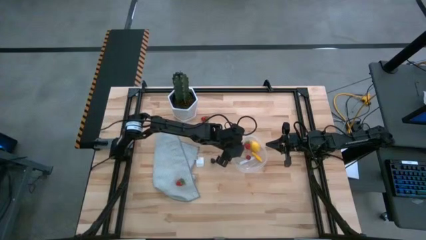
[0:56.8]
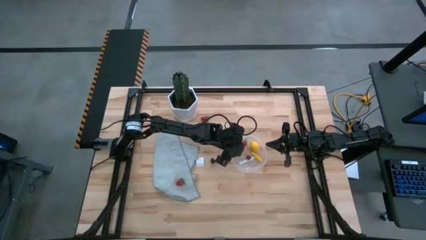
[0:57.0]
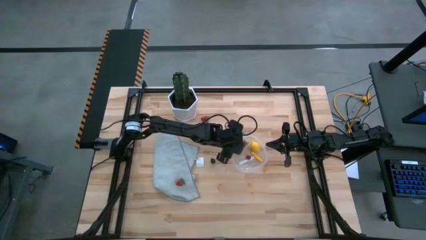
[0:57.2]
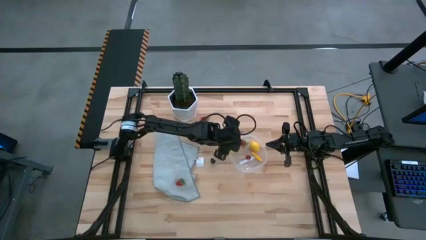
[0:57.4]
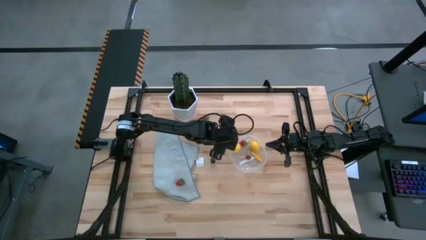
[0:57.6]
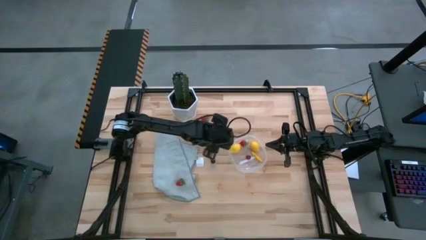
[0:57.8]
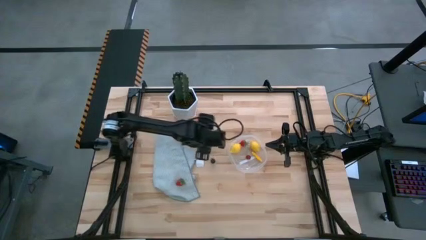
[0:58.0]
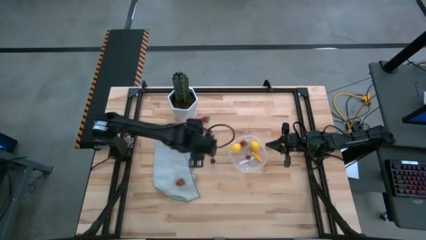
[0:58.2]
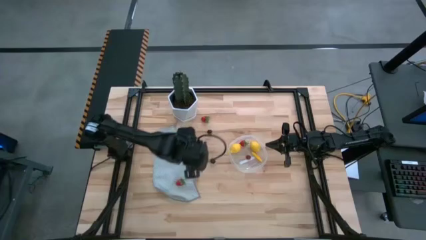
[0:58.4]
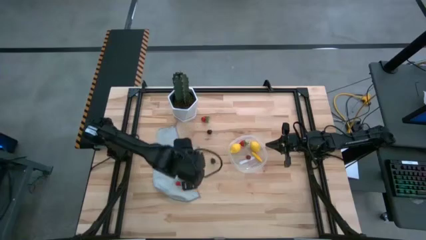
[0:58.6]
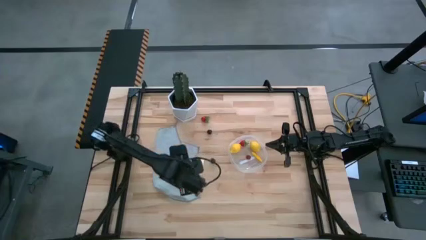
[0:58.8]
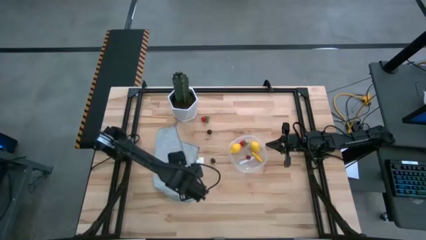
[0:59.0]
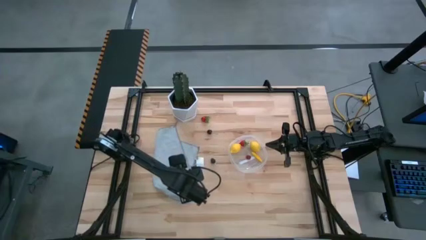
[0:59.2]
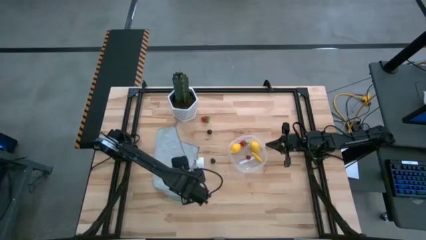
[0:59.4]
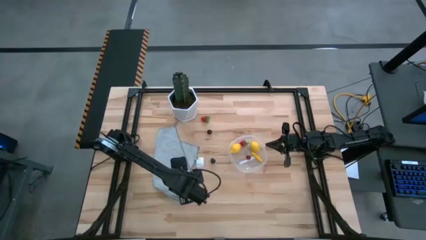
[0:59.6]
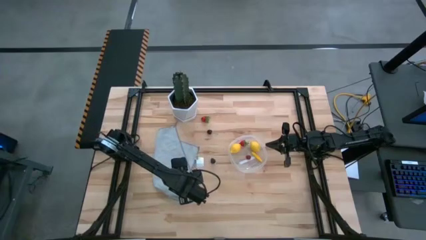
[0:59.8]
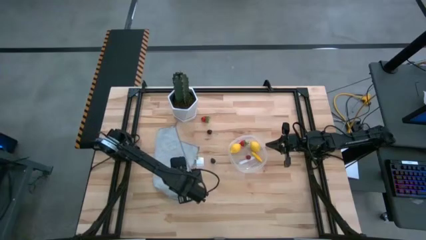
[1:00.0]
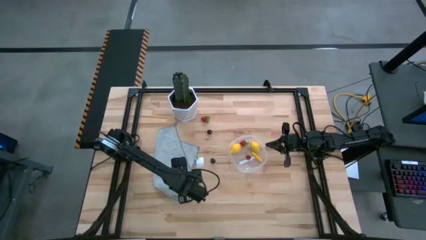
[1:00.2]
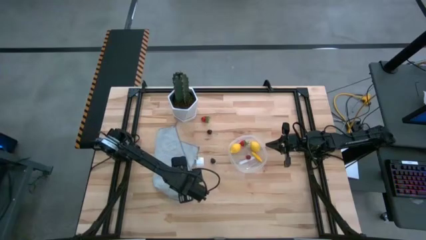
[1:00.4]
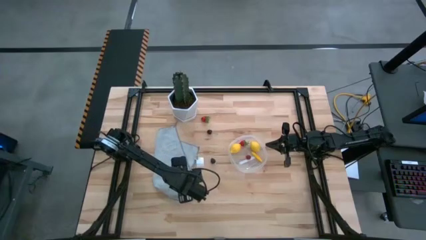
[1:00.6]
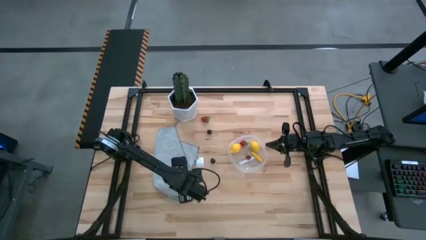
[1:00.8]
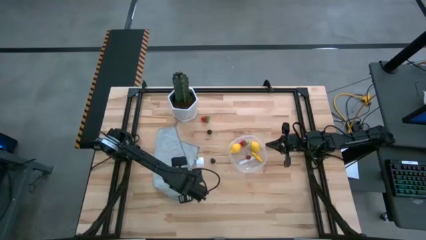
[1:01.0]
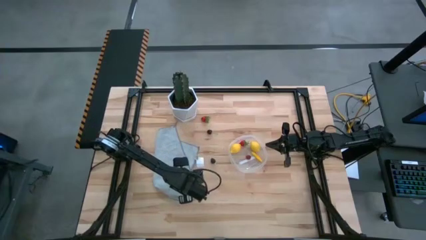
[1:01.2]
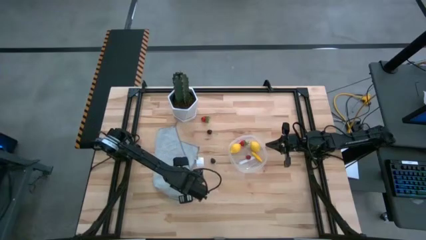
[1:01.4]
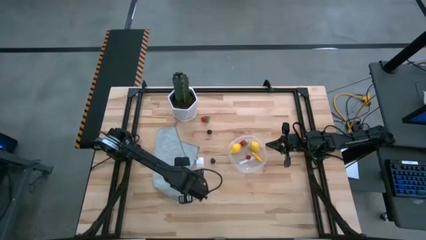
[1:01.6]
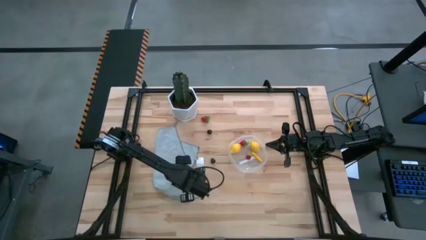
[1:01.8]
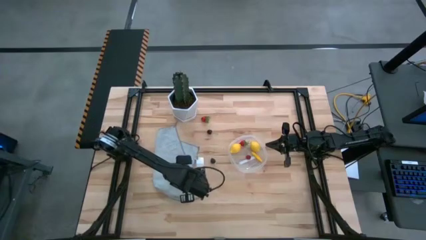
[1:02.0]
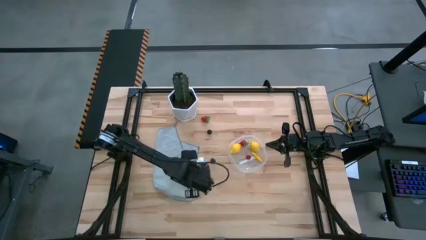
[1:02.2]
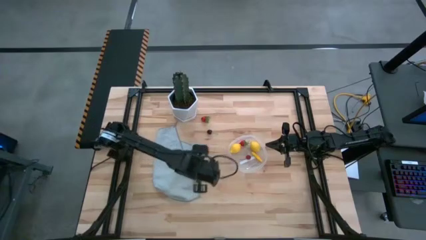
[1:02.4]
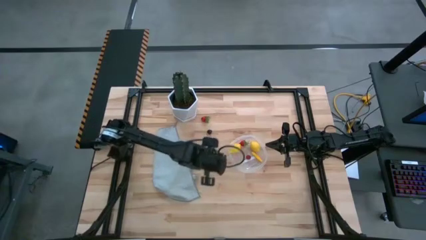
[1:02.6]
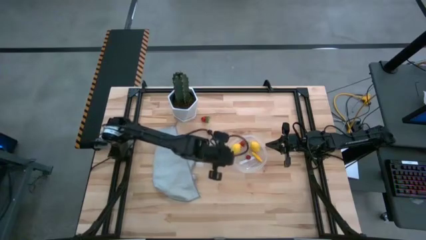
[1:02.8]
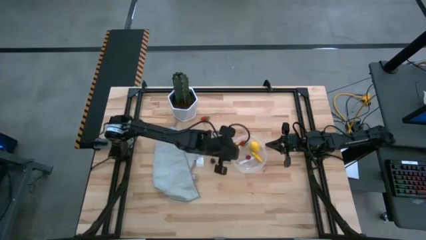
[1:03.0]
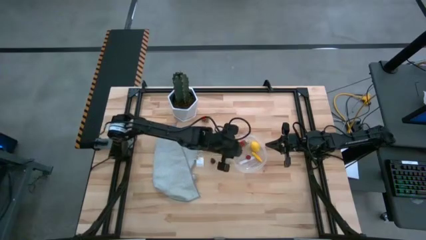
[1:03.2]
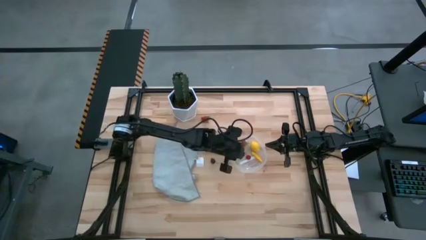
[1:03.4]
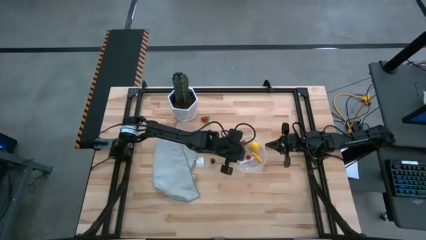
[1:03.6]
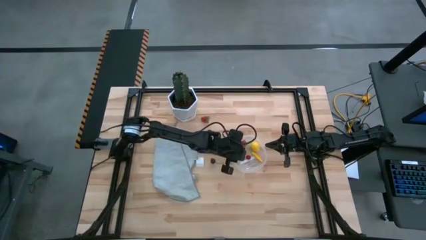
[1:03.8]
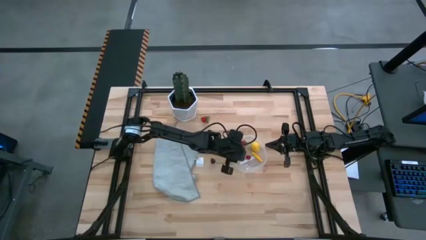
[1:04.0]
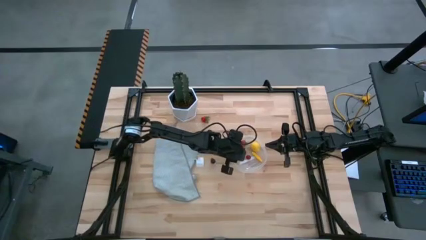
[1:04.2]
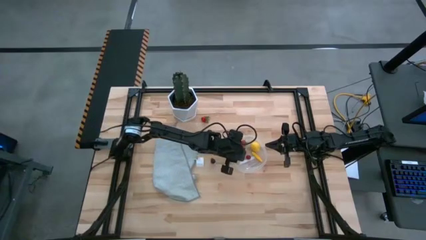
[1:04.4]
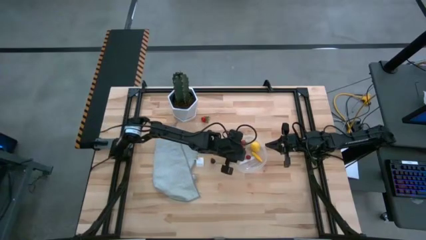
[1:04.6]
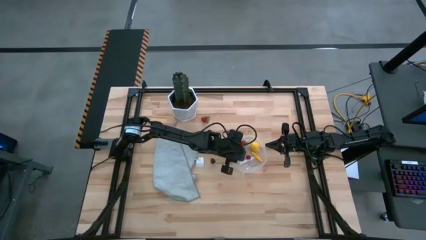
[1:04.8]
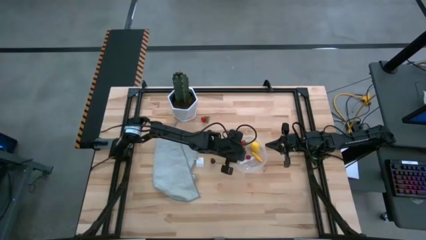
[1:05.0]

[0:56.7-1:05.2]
Task: Pick and placing Produce into tupperware
Put the bottom red strawberry into the transparent container

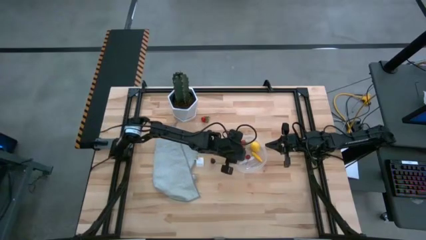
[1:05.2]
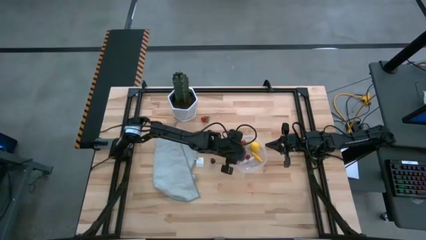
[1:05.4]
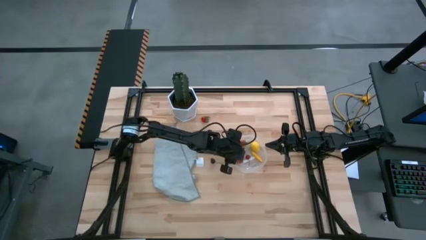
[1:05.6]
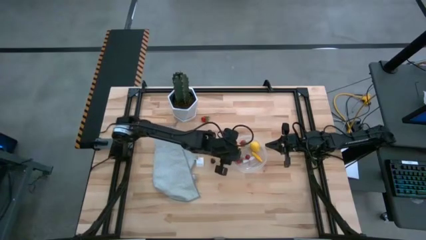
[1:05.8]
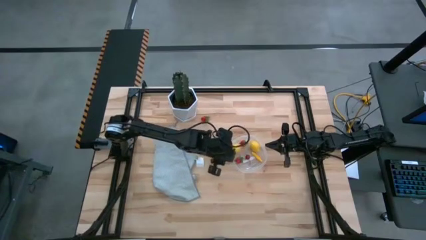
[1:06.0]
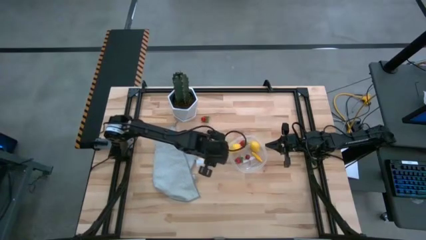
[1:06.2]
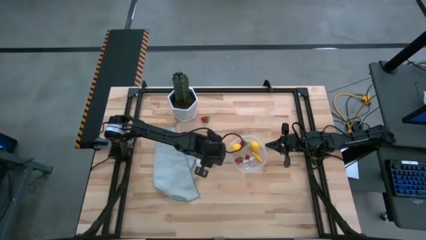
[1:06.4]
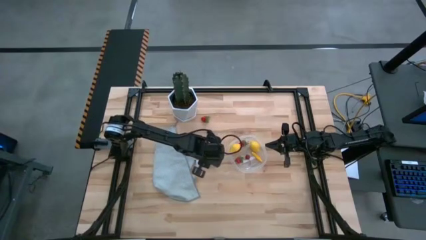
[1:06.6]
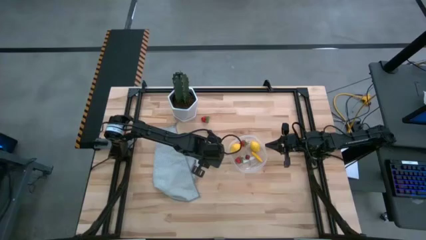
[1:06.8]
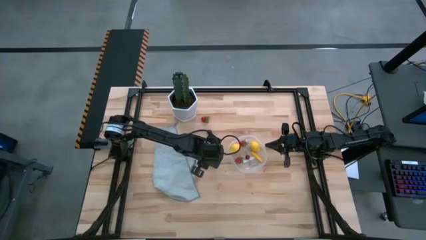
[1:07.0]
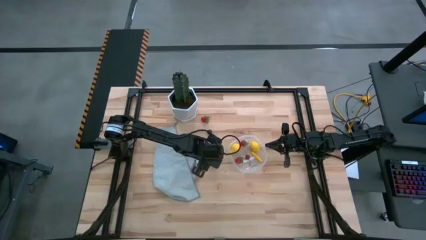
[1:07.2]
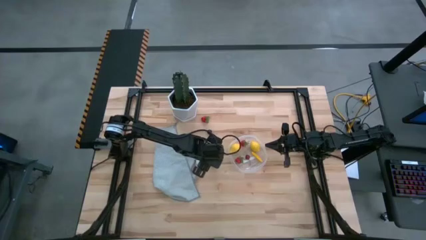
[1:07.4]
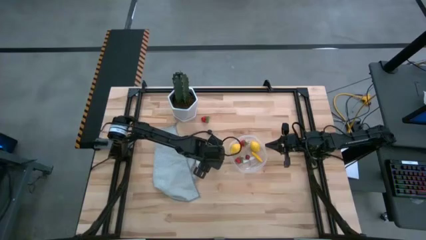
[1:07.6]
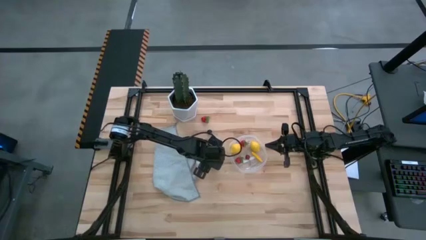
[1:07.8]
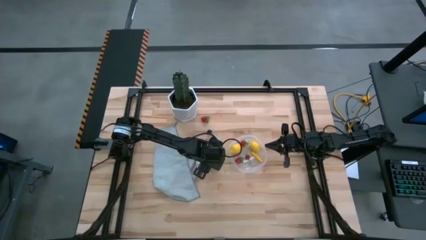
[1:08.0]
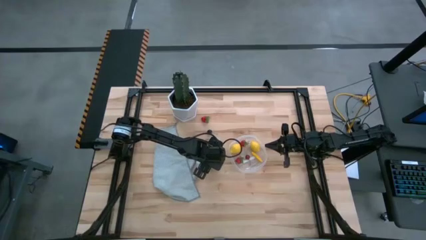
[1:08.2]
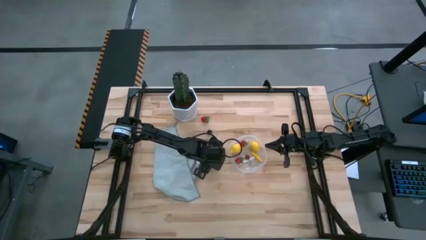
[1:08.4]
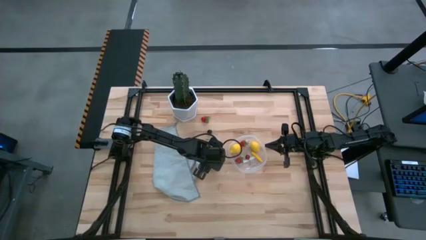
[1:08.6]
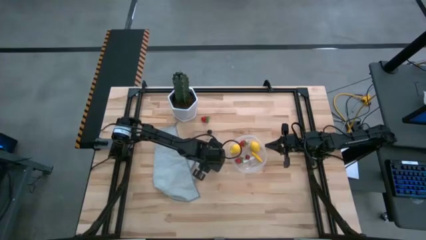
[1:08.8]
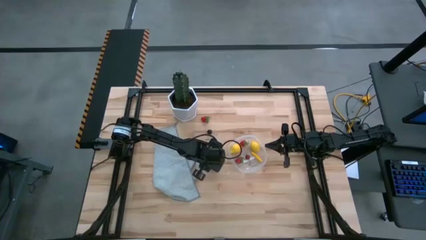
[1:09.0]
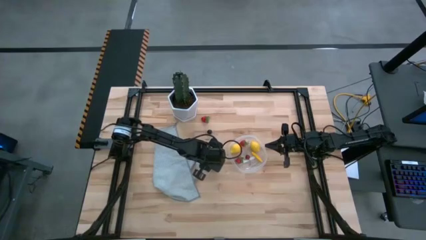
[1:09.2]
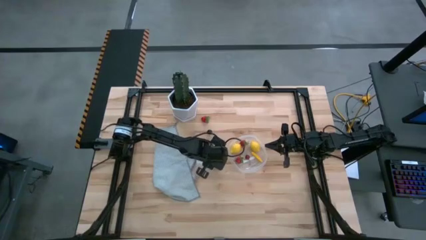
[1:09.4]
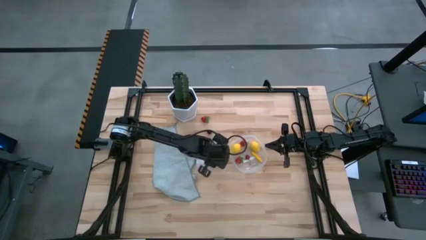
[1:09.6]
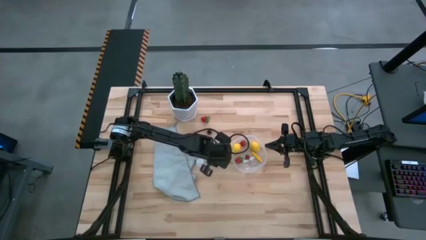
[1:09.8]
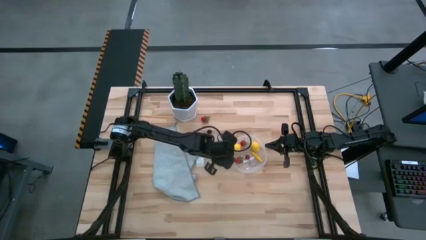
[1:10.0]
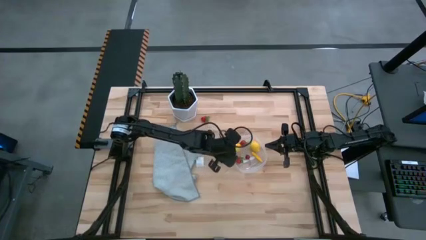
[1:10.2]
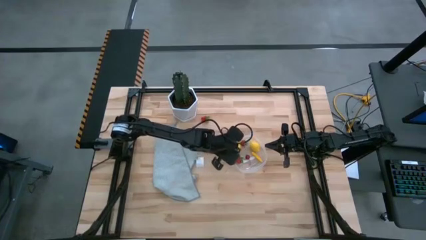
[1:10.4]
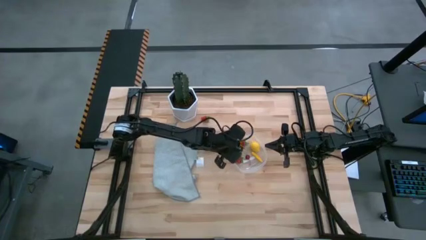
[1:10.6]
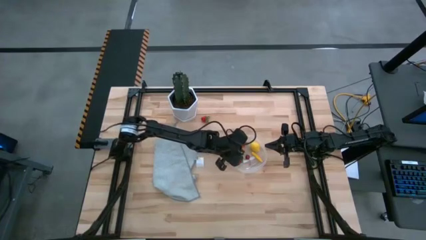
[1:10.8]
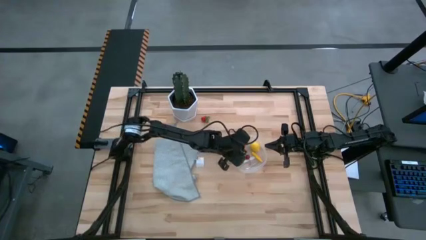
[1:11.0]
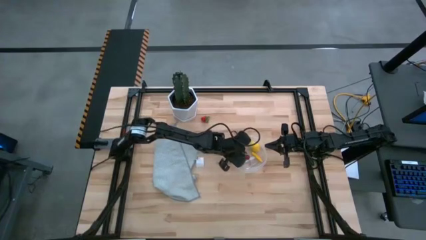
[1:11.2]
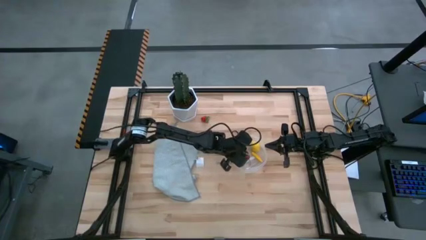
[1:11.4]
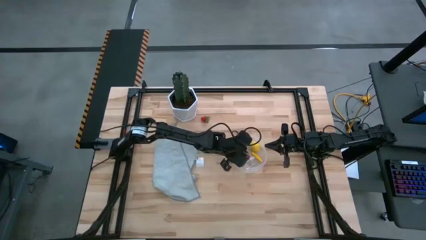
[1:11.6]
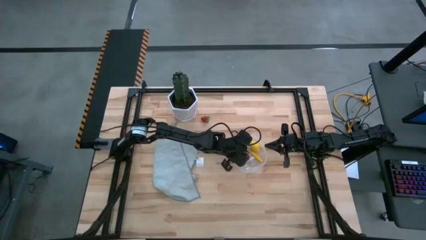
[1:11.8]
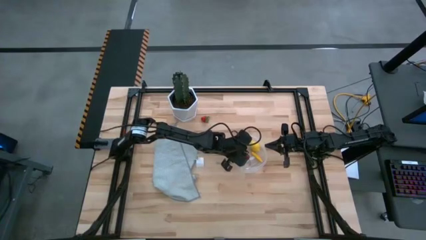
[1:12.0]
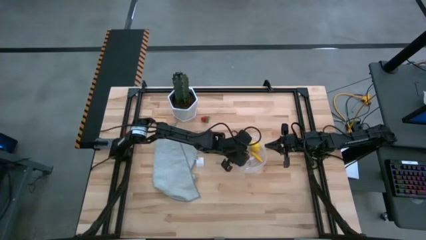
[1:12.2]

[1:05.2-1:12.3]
Put the bottom black berry into the transparent container

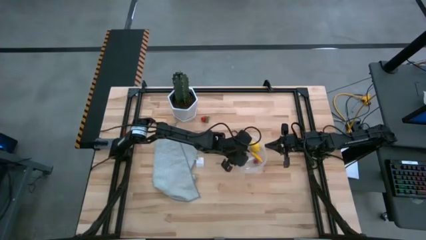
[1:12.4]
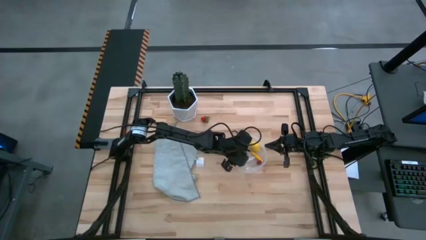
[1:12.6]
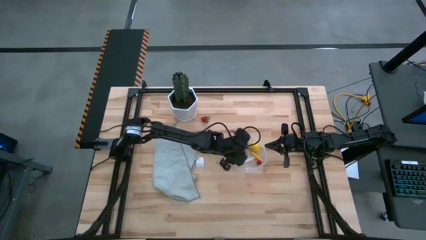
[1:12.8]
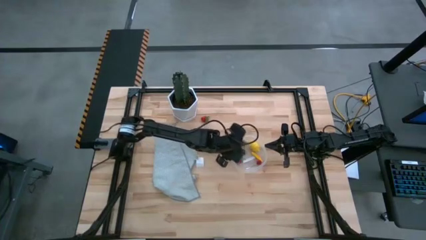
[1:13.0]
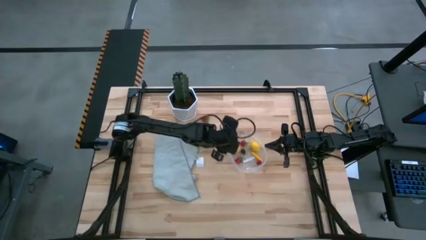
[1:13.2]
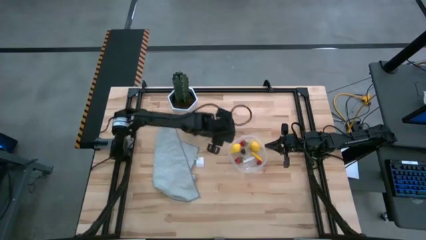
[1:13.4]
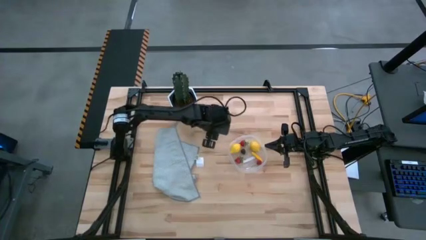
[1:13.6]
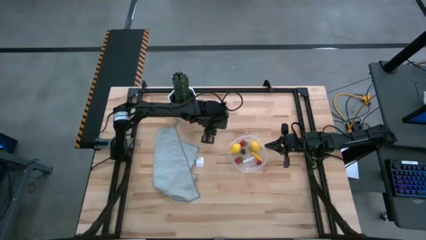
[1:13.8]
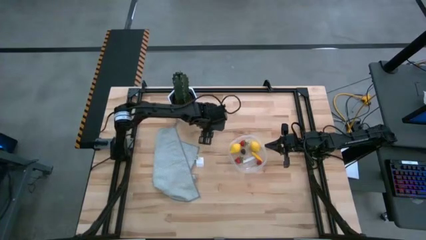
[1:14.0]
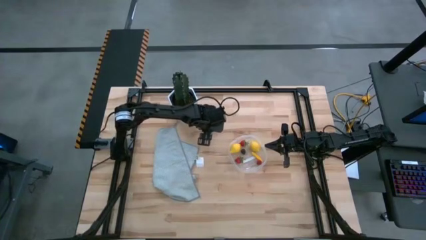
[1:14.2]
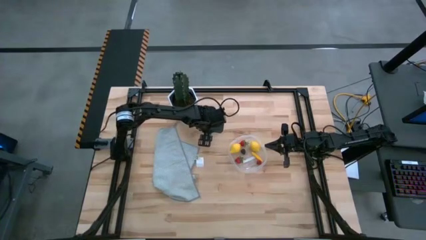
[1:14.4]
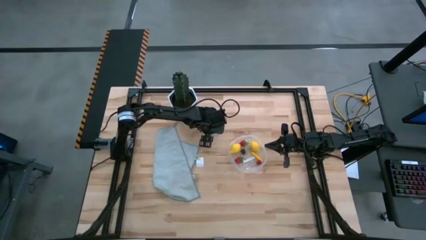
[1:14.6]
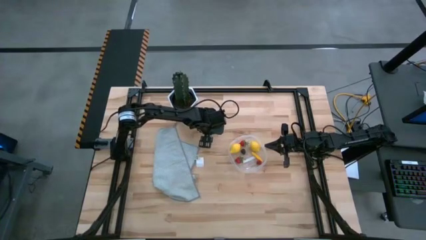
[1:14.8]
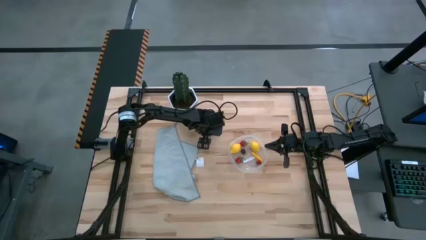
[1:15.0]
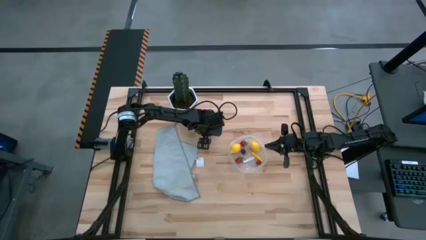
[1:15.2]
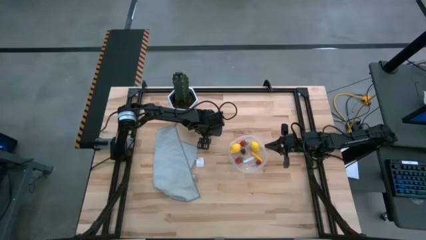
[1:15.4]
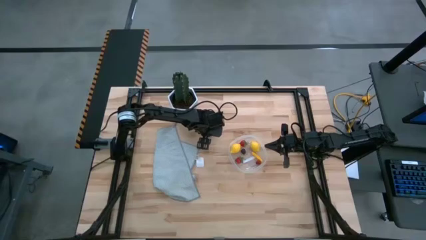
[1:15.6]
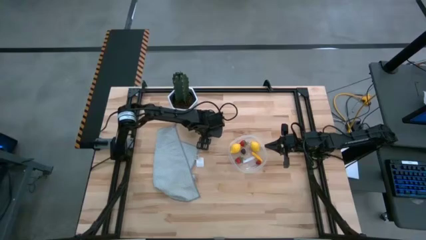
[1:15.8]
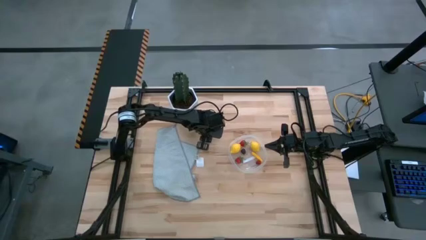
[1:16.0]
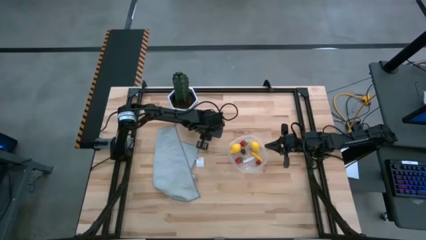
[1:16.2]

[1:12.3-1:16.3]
Put the black cherry into the transparent container
